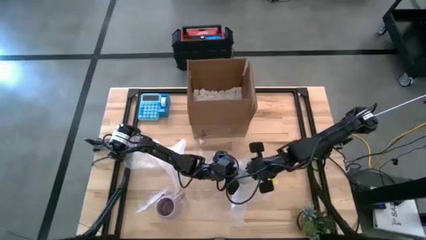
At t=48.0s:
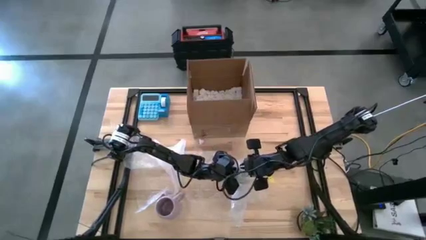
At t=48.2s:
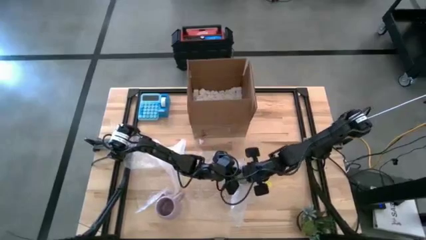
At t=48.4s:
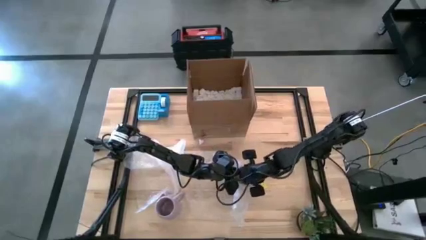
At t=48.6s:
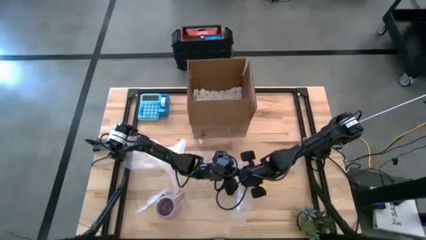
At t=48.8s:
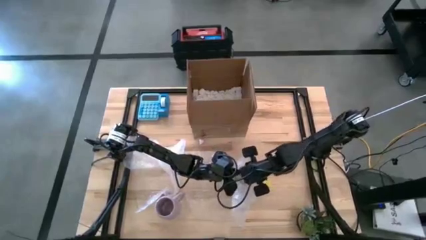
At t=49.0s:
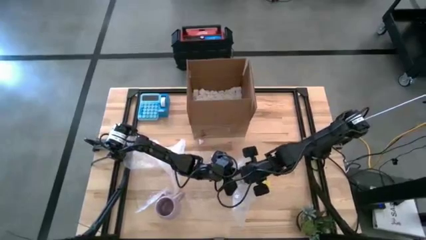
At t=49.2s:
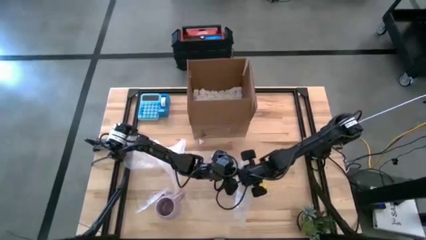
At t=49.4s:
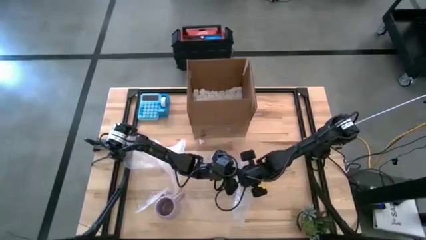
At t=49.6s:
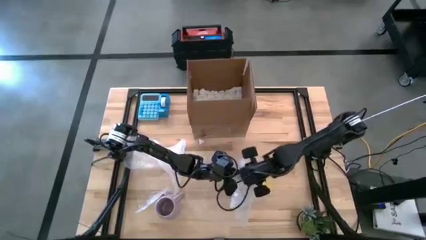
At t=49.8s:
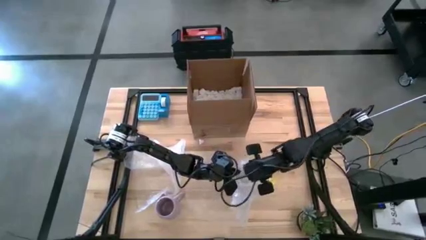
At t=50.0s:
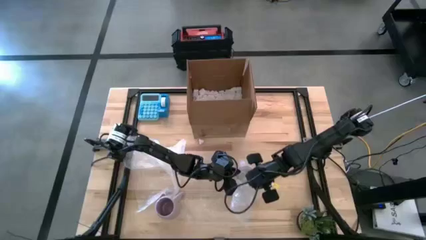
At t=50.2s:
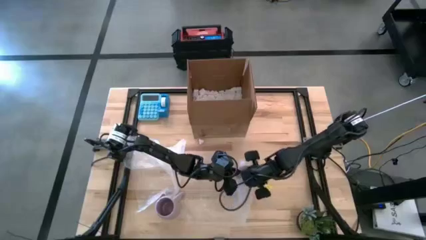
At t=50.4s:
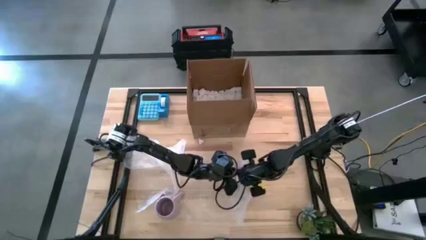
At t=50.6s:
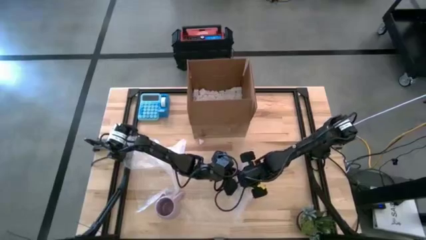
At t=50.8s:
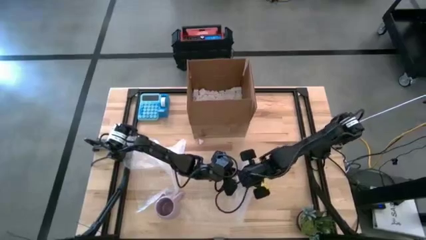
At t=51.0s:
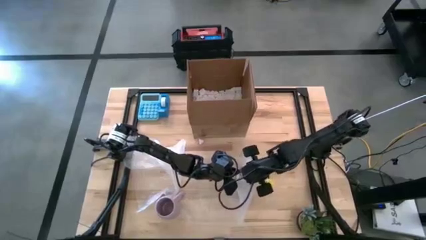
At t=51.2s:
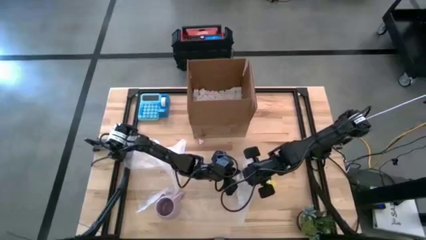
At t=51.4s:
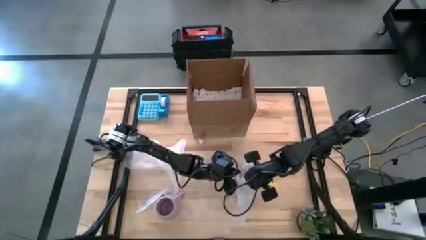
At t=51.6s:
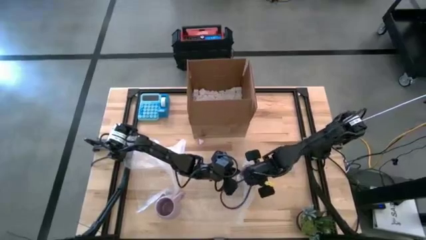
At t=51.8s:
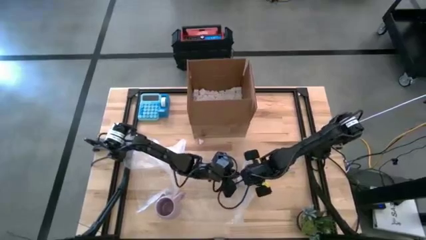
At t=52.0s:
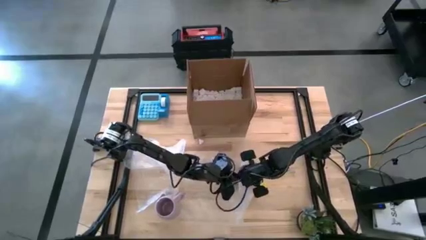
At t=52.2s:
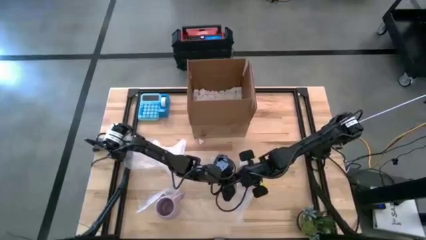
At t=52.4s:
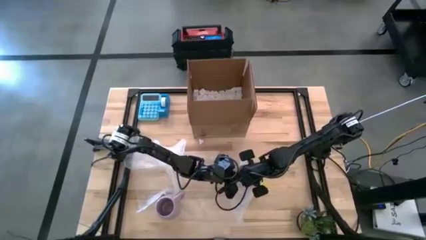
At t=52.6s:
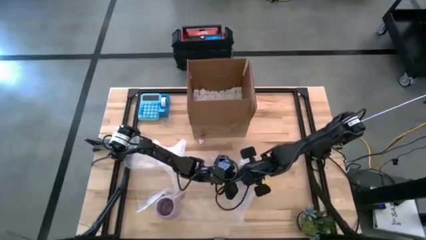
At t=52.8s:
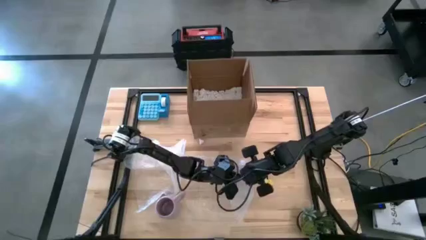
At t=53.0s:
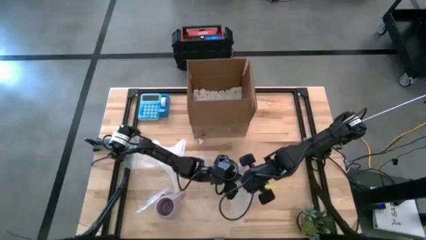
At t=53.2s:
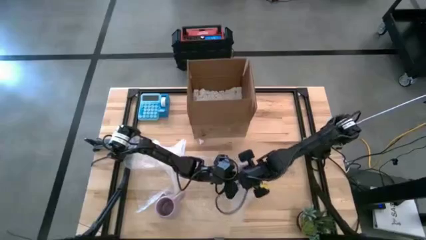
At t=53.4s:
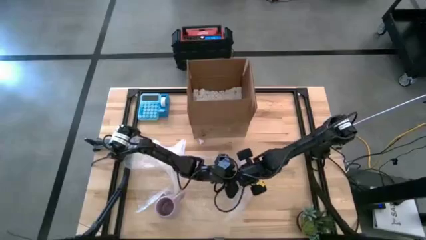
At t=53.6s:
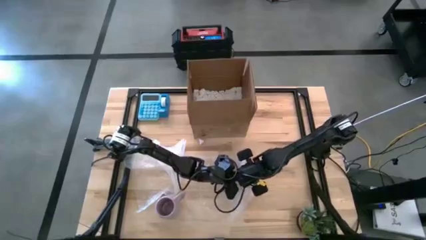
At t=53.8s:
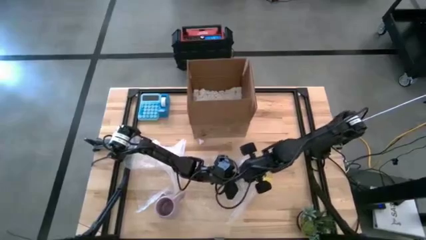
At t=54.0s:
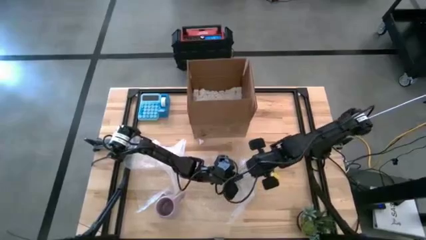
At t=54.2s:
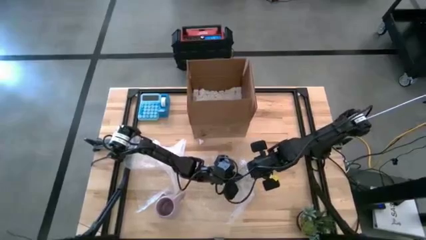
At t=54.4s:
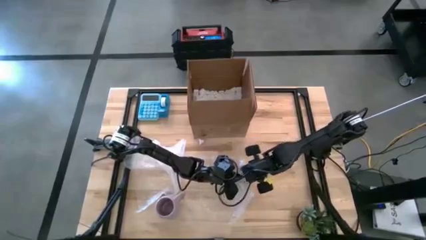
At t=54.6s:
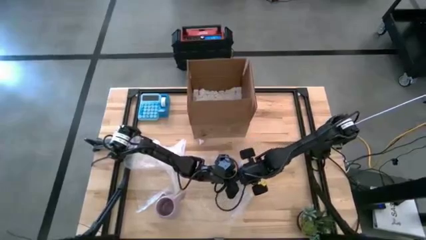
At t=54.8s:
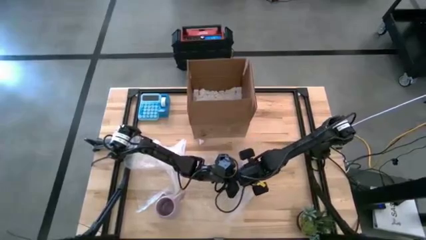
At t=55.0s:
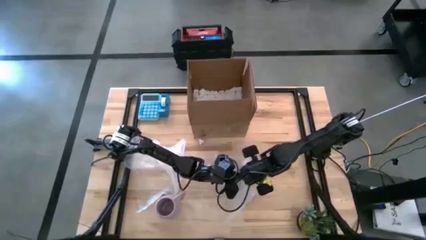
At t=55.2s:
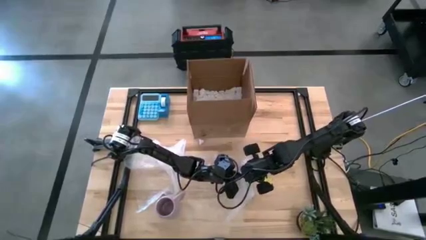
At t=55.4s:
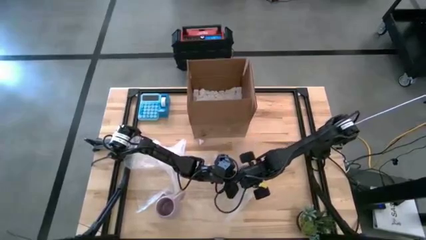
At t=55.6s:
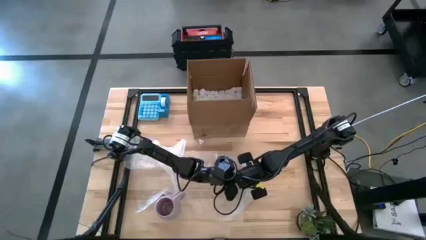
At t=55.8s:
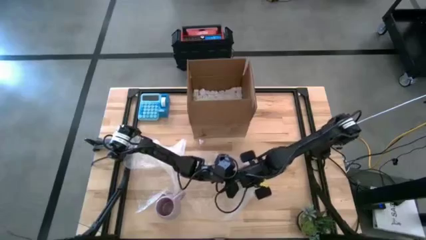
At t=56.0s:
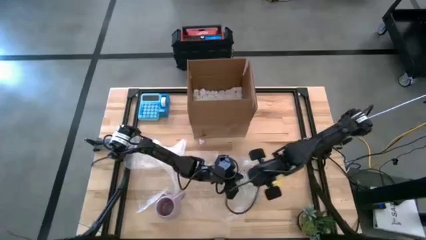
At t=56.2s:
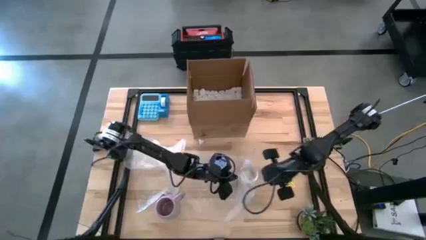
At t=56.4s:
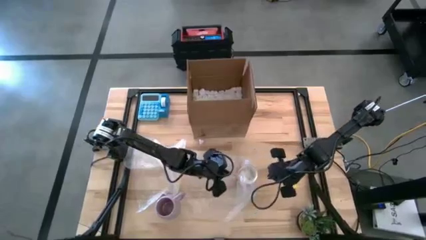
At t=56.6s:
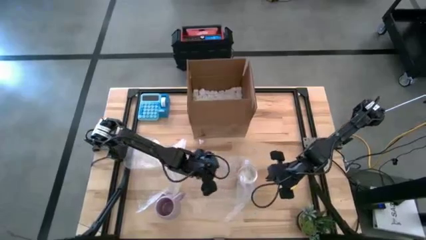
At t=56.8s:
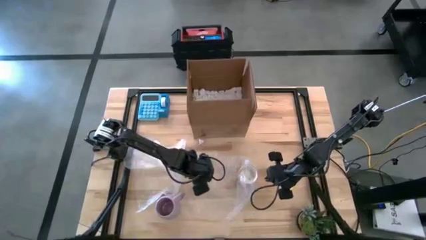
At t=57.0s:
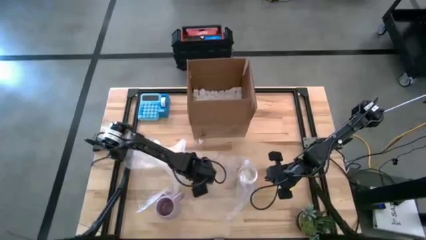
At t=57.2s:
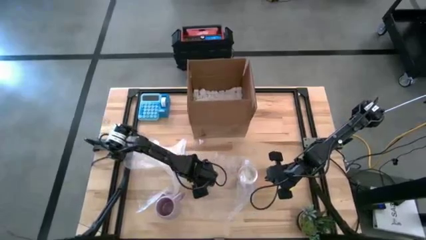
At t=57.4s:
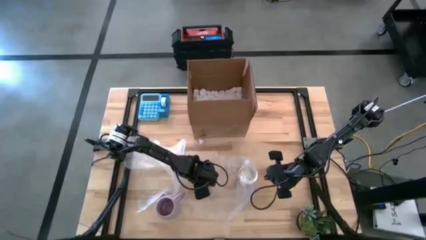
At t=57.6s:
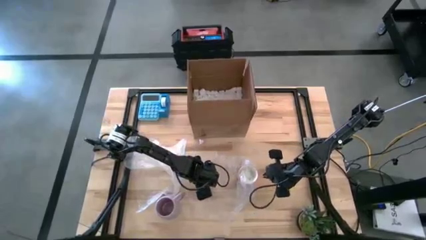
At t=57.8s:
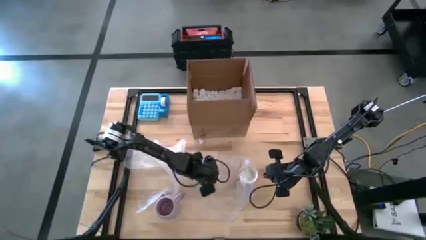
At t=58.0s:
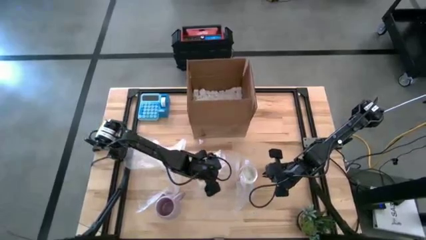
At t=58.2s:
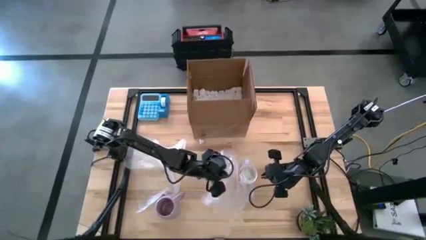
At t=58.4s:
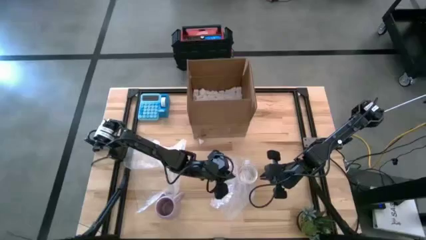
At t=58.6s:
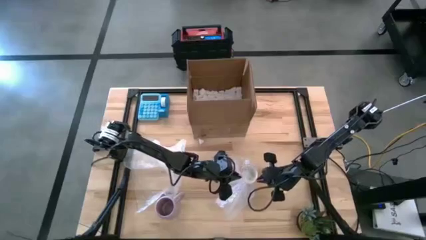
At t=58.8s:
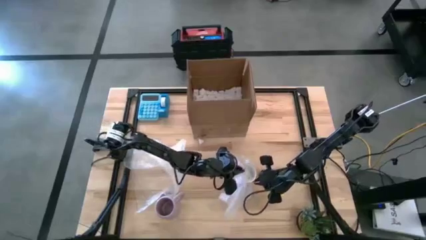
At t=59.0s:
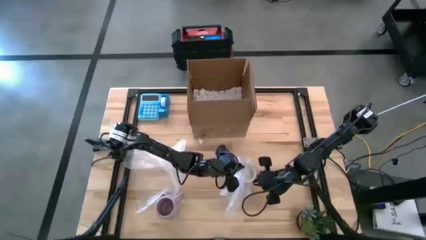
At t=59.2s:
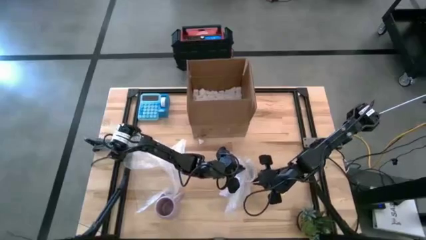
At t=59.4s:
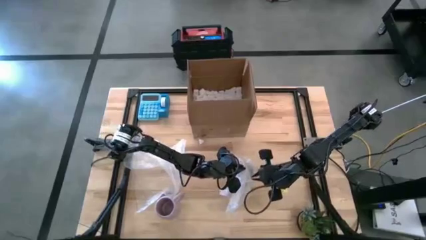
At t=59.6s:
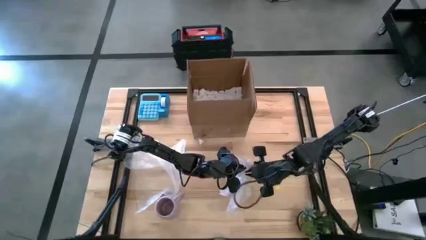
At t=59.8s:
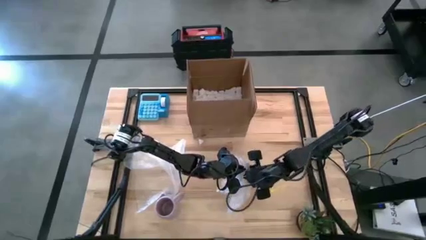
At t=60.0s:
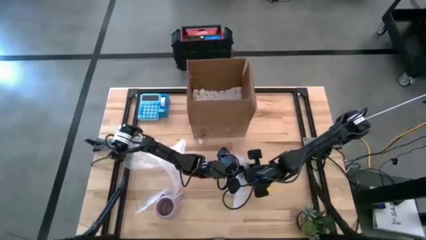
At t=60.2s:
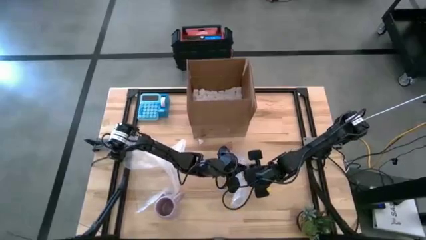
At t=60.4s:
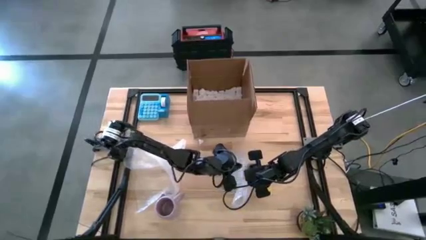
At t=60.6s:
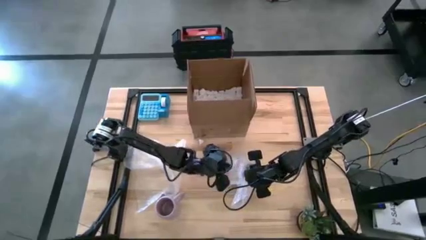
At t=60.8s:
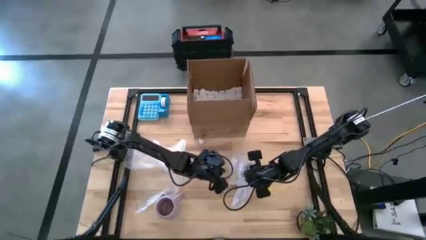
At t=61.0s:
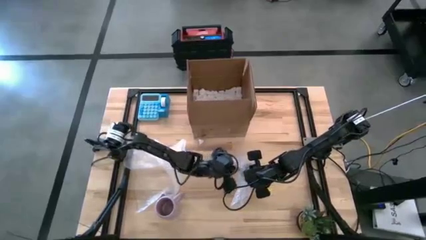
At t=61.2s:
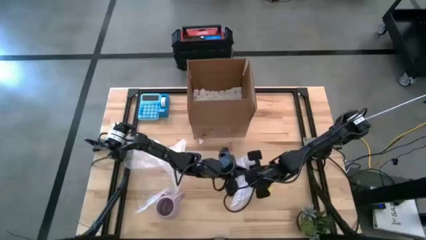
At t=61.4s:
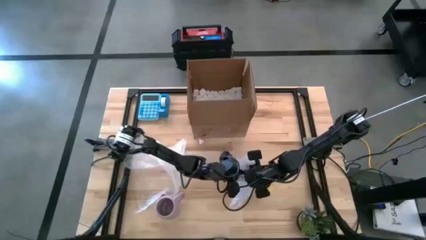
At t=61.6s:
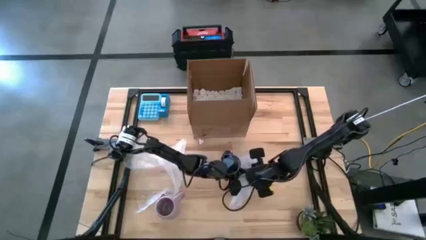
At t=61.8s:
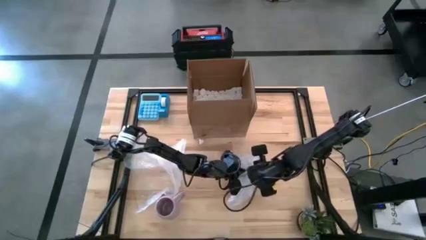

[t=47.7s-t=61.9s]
Task: wrap mug
Wrap the white mug with bubble wrap
